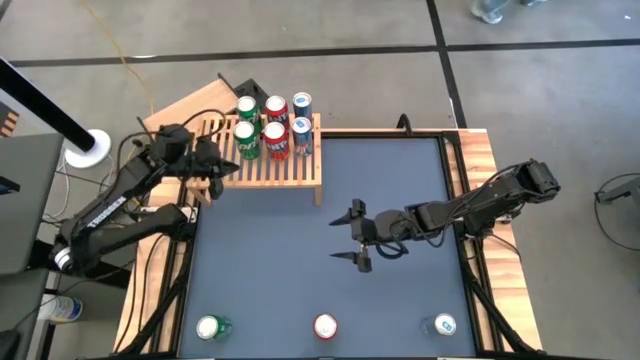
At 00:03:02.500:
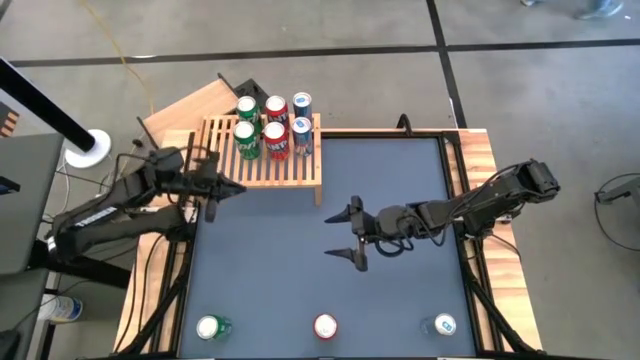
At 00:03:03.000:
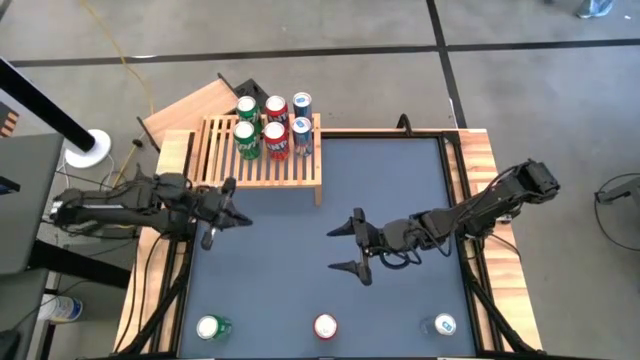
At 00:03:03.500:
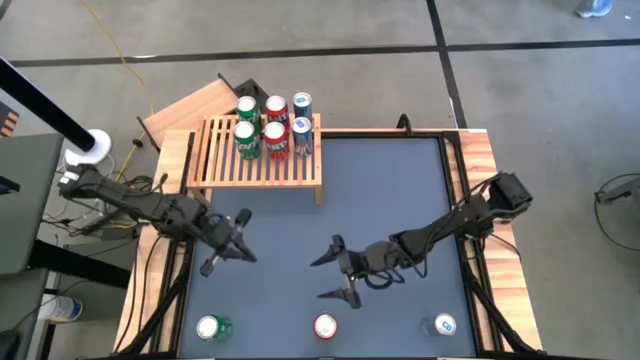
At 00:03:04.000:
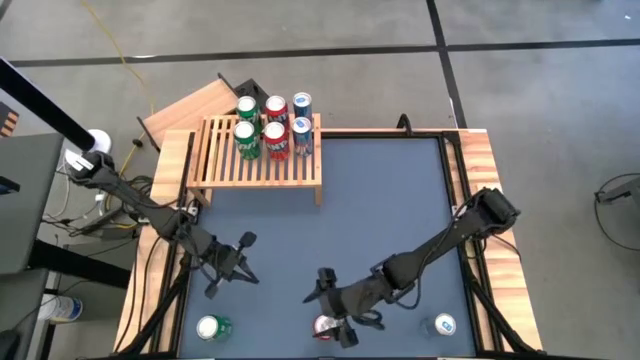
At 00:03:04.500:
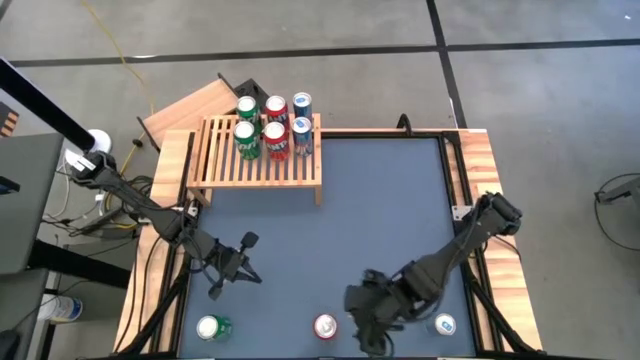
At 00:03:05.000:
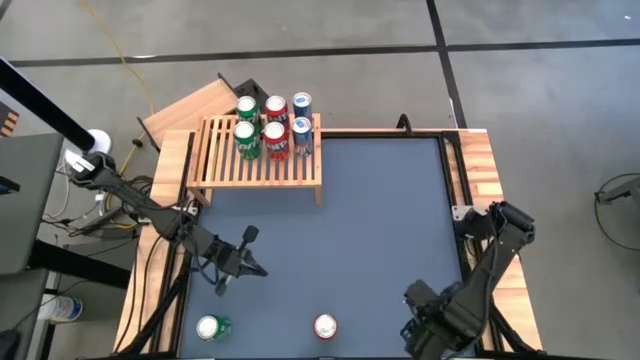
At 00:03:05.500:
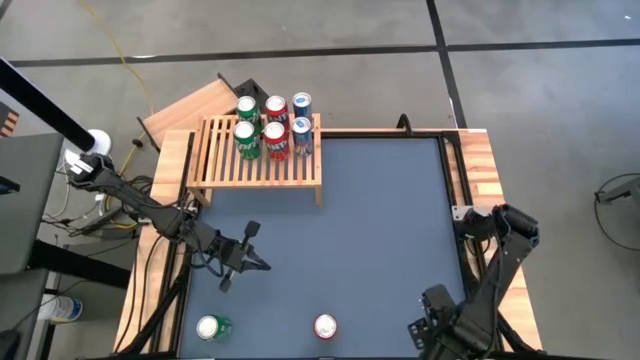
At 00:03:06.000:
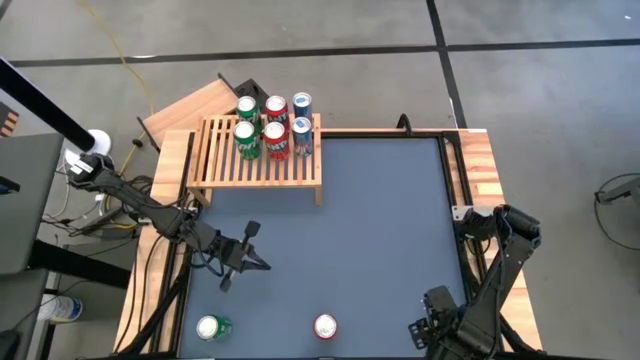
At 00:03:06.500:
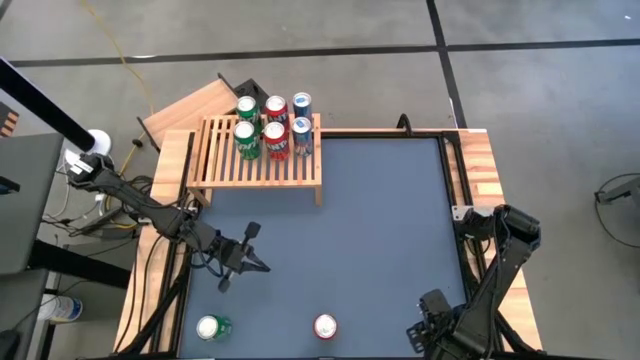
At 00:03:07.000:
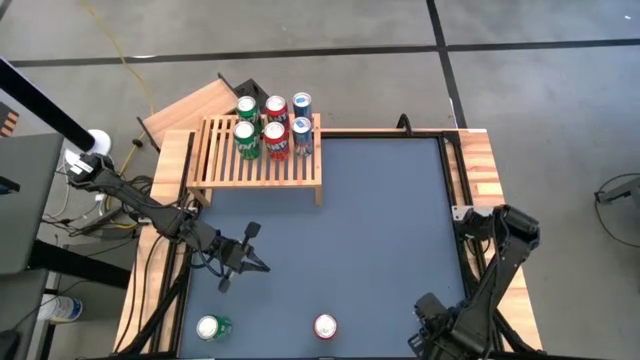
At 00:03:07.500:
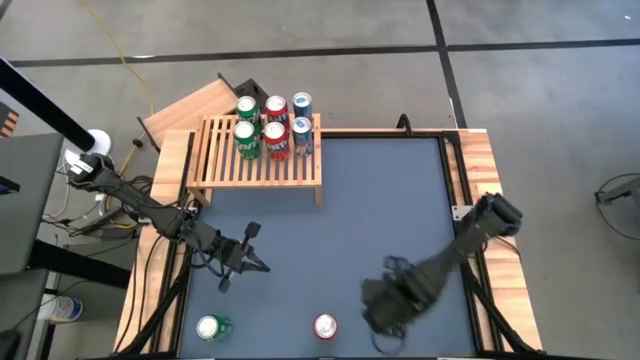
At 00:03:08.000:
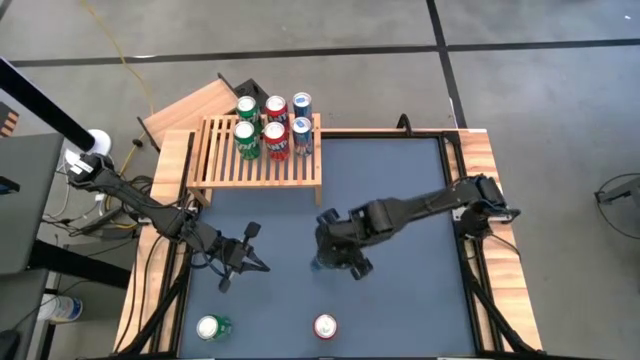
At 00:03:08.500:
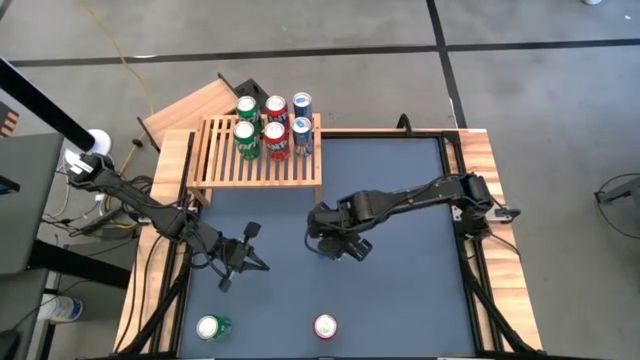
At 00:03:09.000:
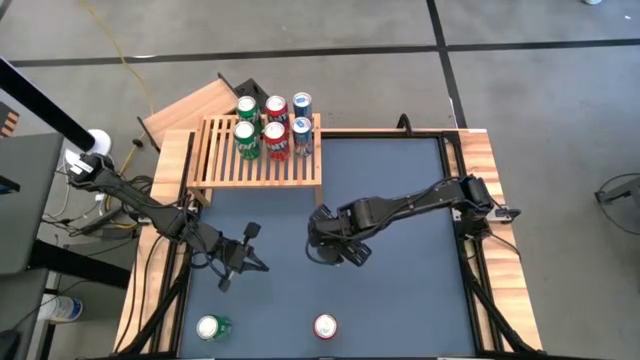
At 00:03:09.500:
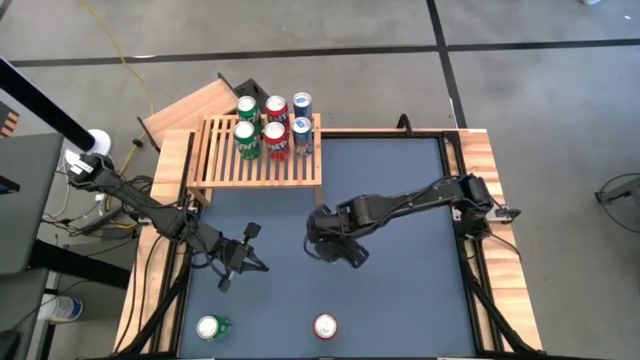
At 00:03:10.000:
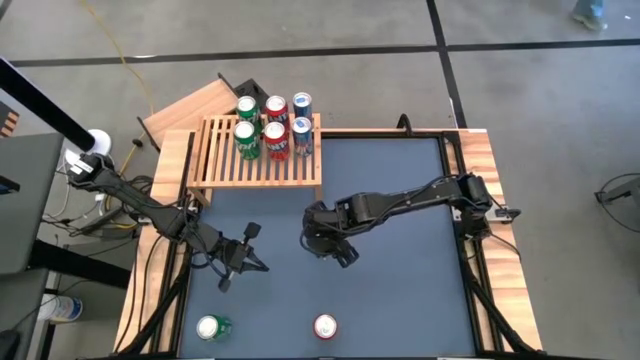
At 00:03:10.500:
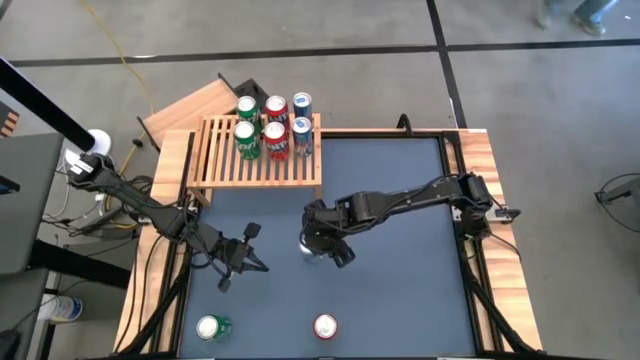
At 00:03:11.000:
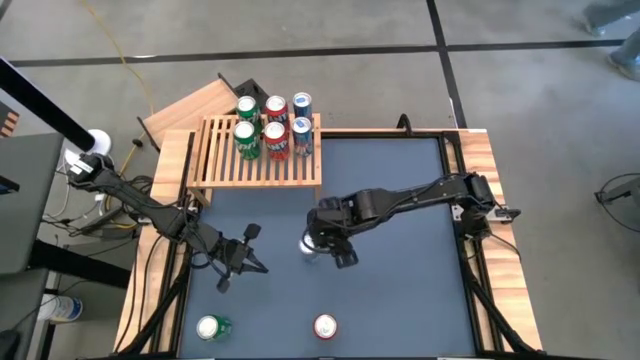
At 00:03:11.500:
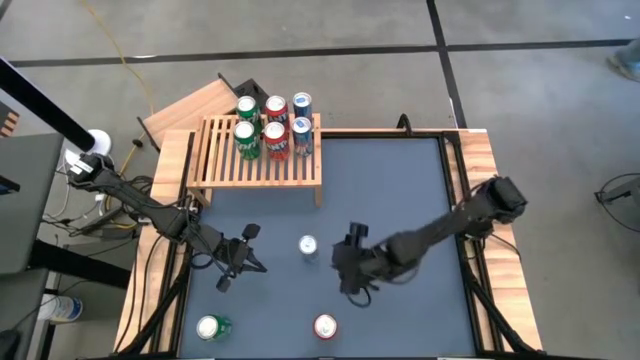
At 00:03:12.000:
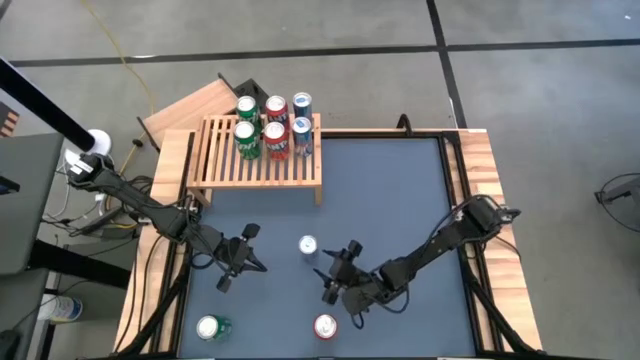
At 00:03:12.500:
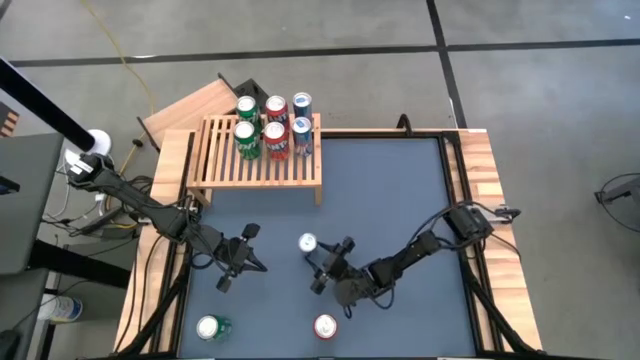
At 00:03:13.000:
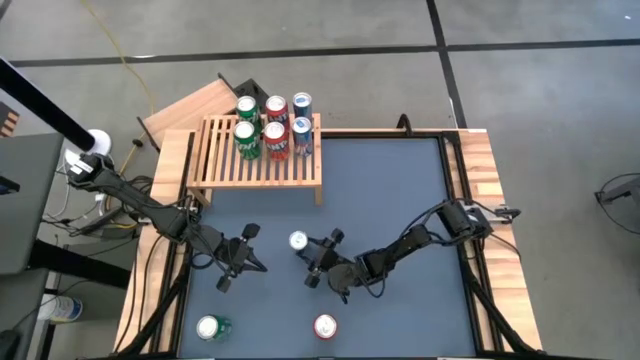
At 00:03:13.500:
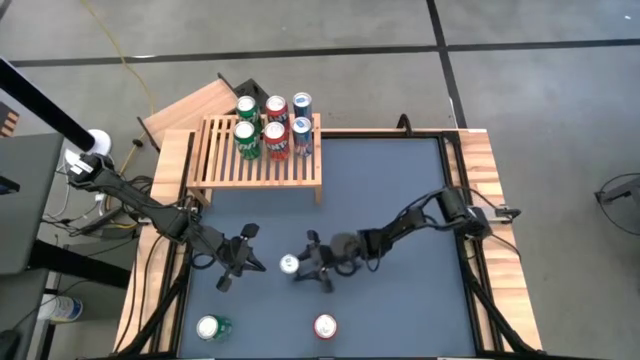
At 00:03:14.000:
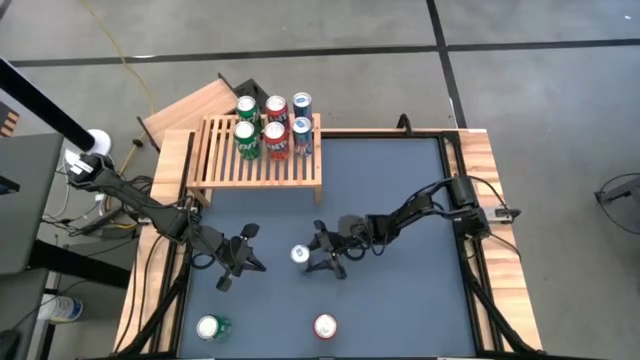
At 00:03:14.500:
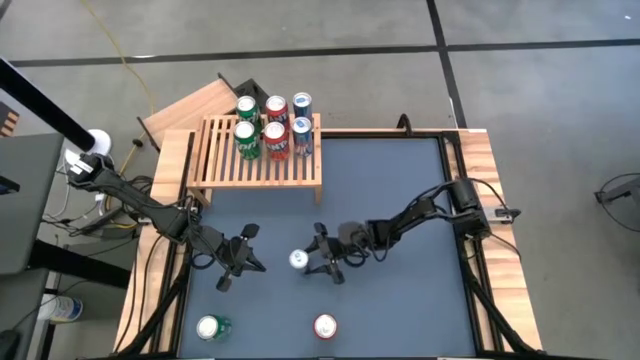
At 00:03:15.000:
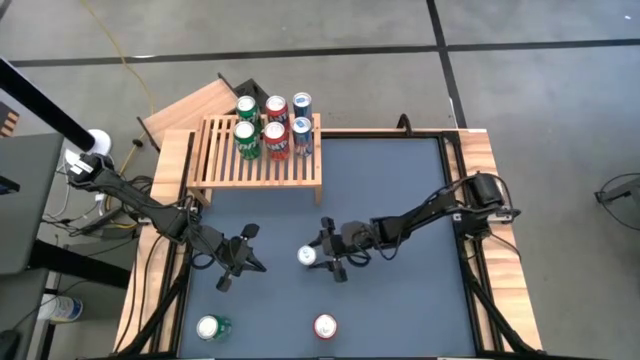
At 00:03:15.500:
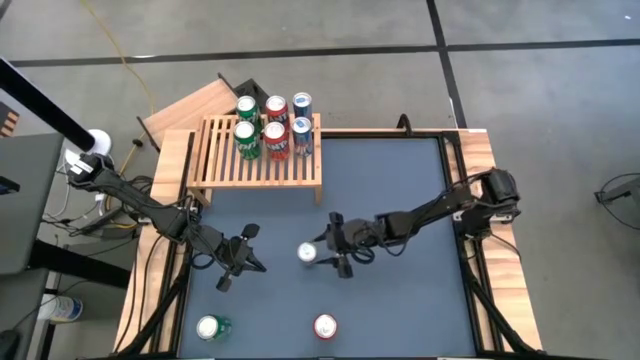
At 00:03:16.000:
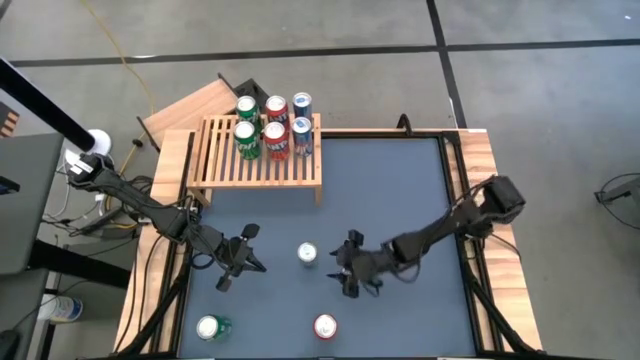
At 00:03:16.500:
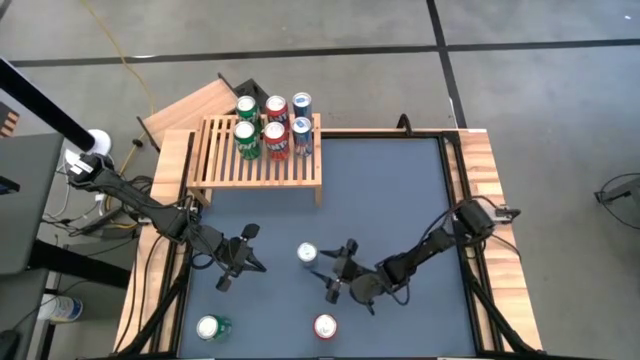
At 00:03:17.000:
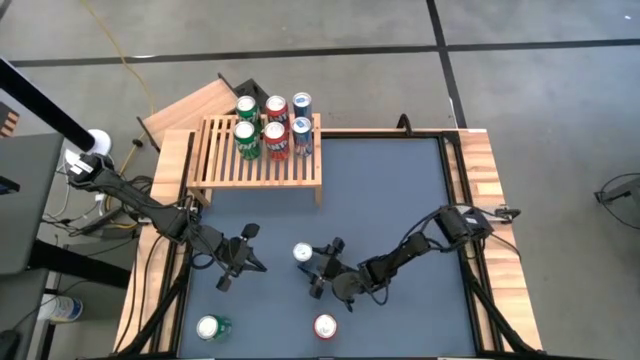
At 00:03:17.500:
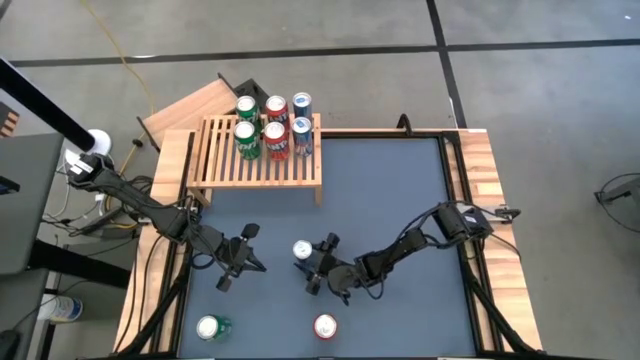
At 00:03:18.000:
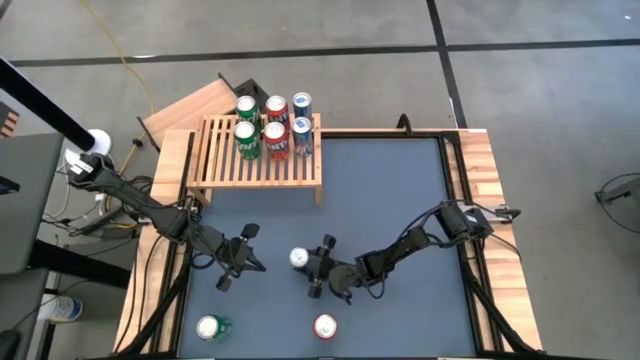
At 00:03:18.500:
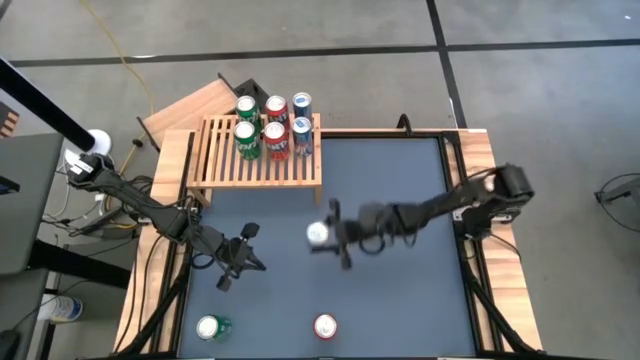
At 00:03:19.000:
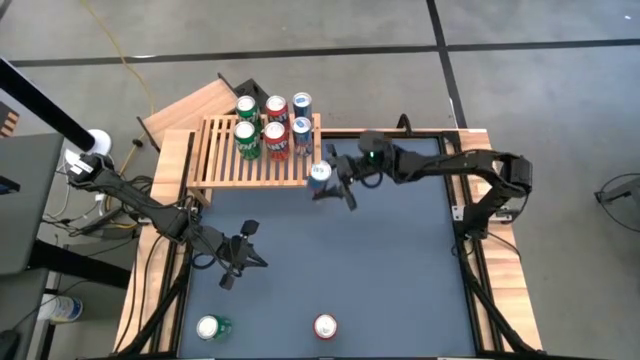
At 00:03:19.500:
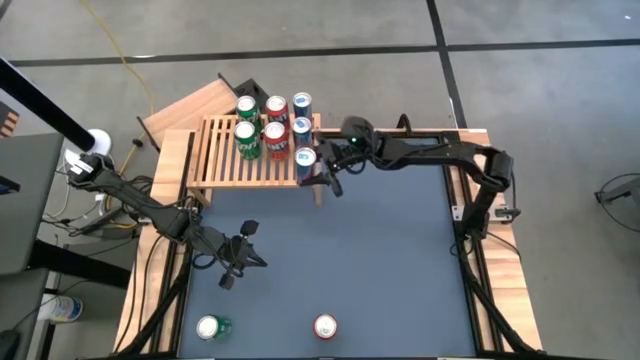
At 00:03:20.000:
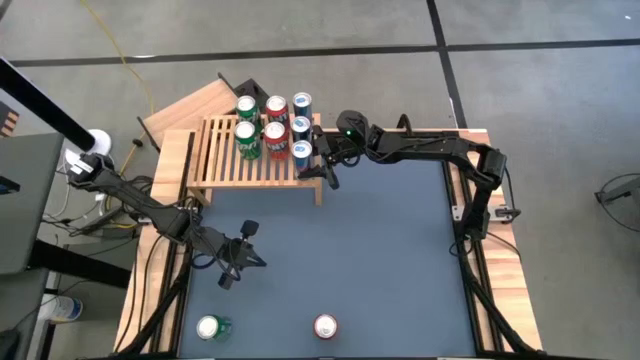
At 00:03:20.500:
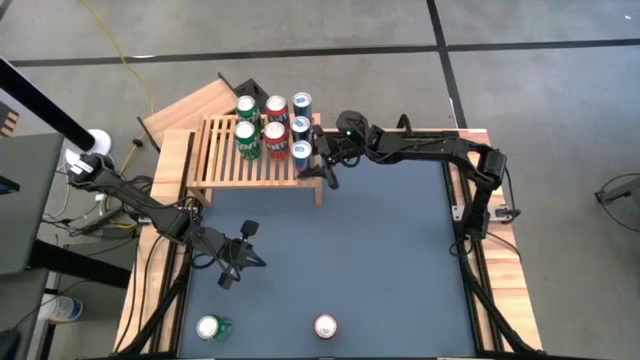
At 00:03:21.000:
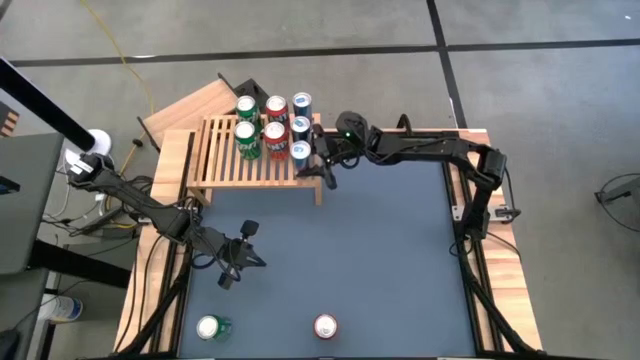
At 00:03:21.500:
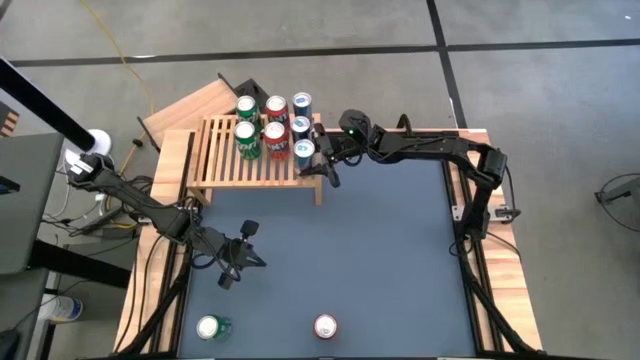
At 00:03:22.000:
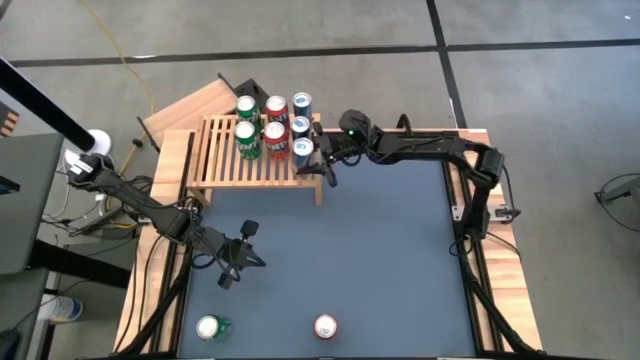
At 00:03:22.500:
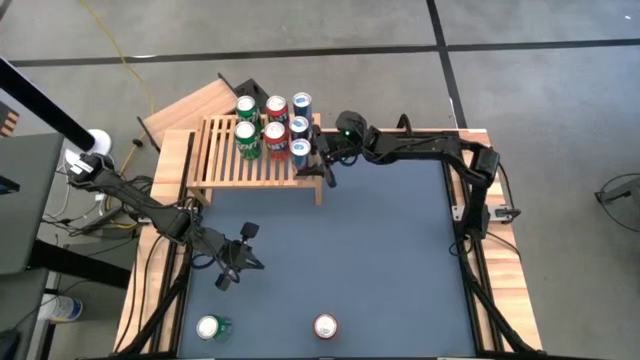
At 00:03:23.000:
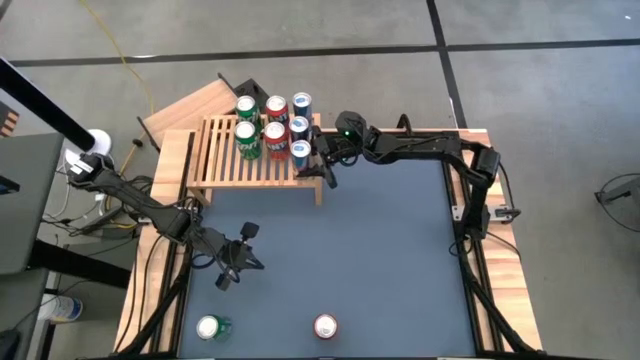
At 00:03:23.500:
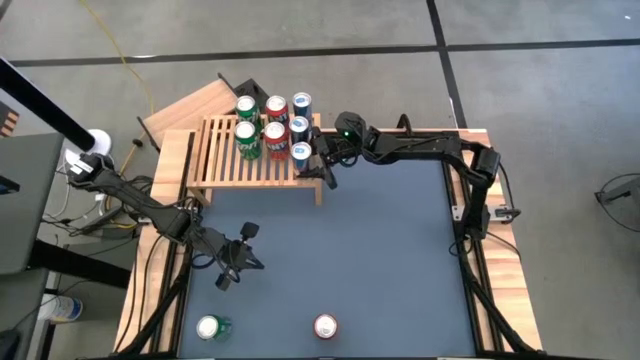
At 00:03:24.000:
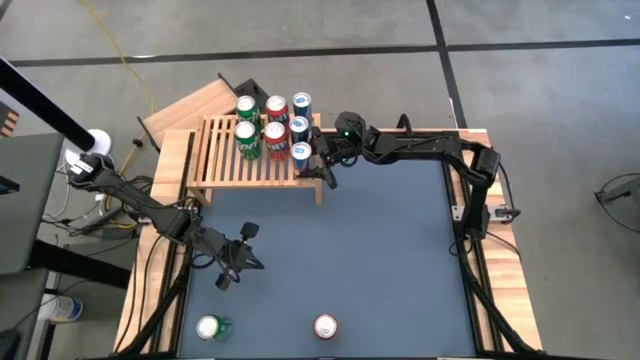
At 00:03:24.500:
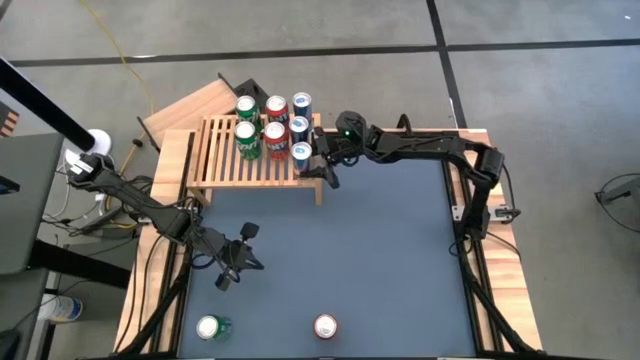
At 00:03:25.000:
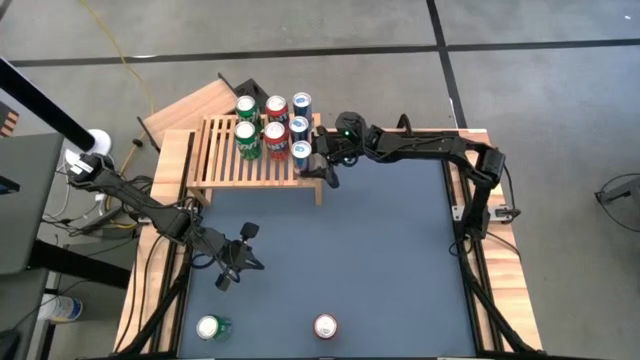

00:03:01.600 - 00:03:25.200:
Task: Place canned beverage on shelf
Put the blue soda can on the shelf aligned with the other blue soda cans
